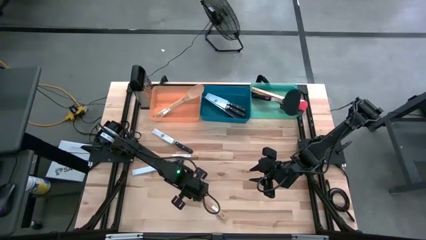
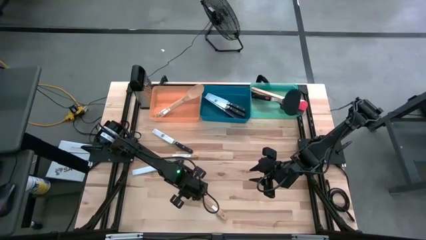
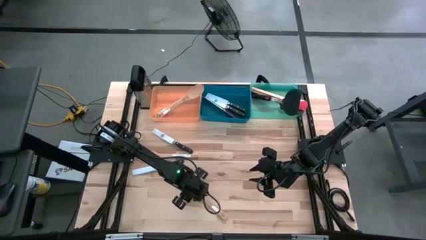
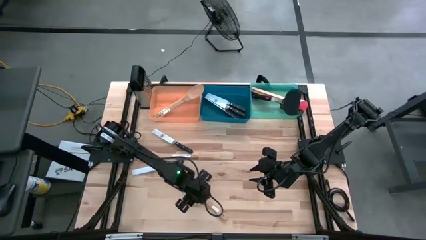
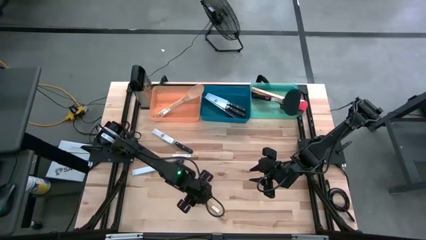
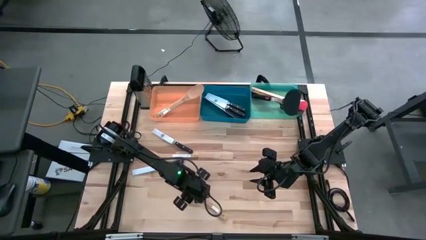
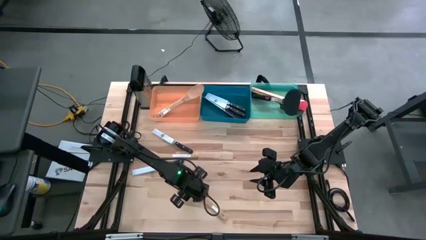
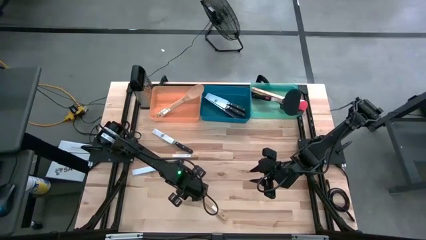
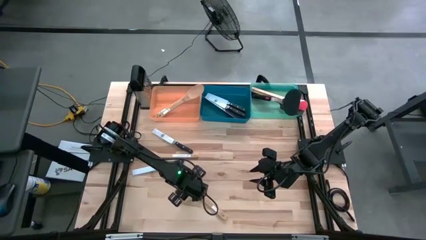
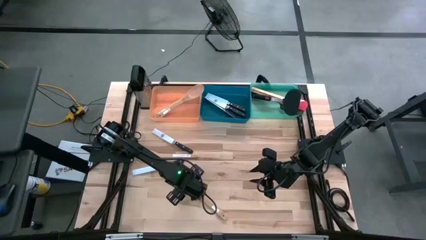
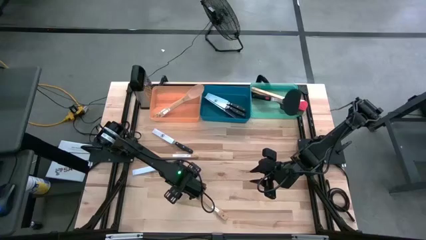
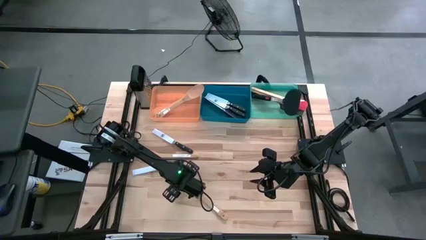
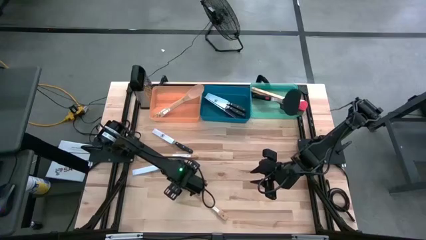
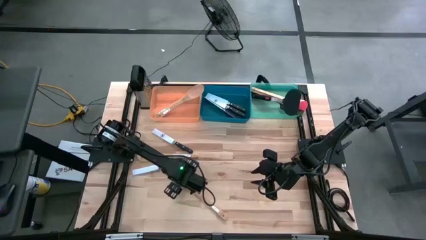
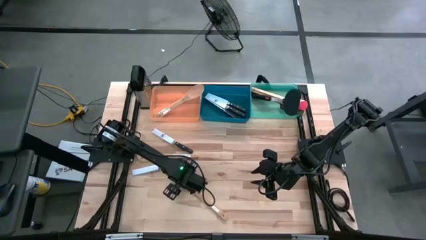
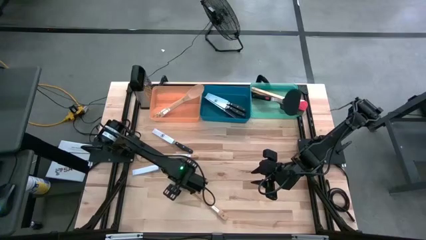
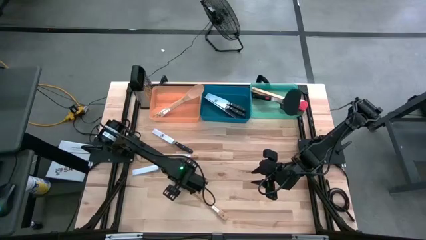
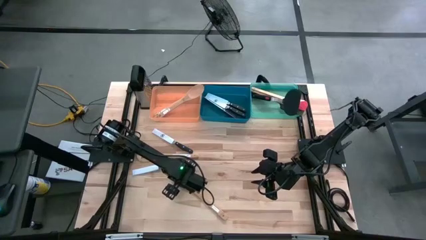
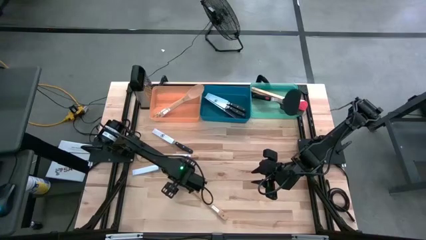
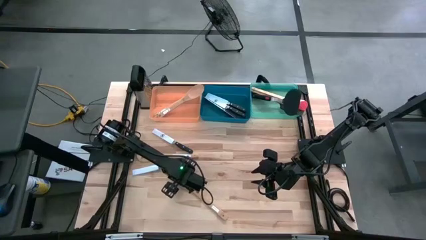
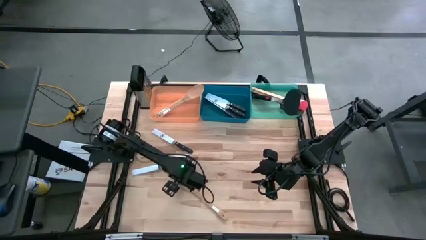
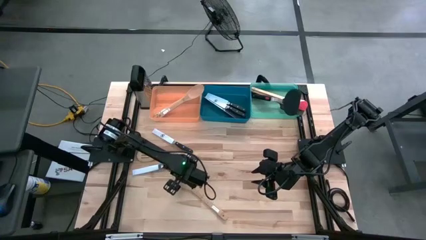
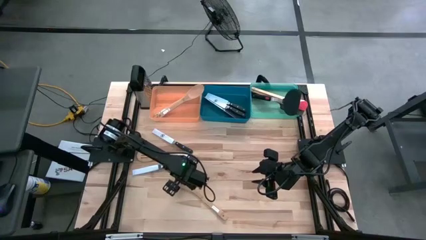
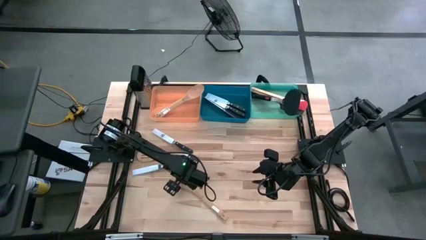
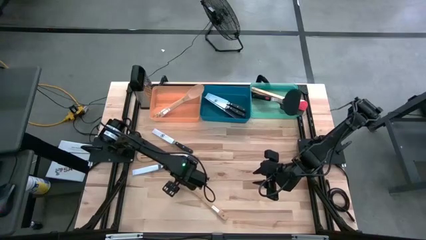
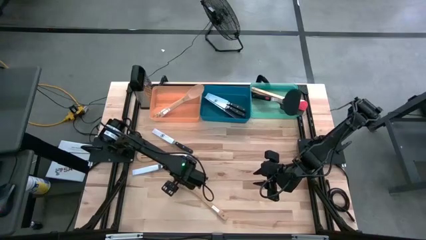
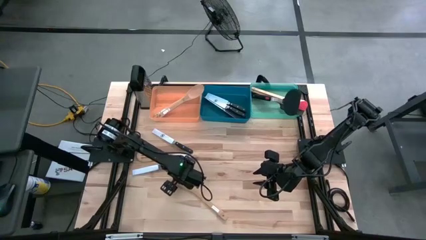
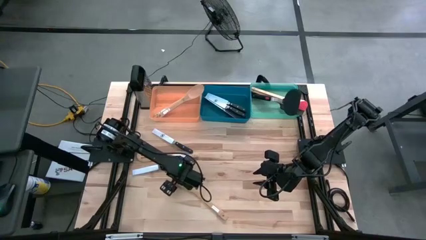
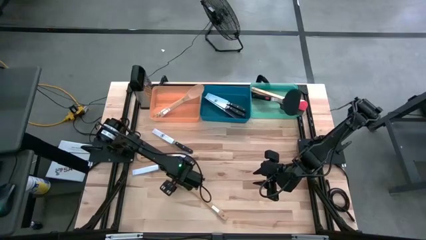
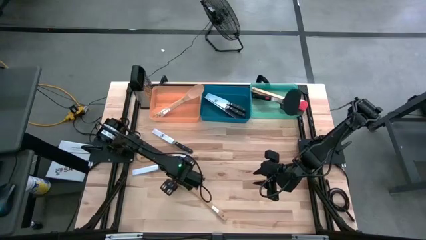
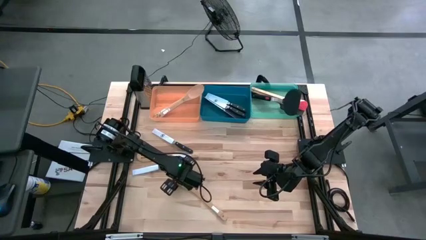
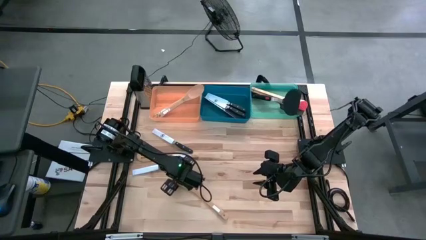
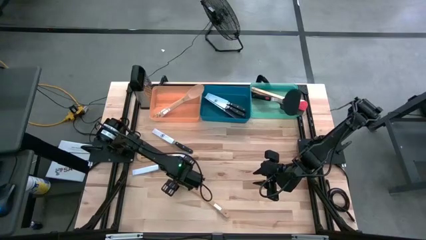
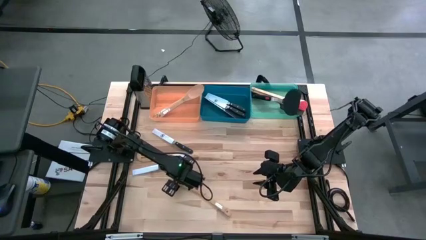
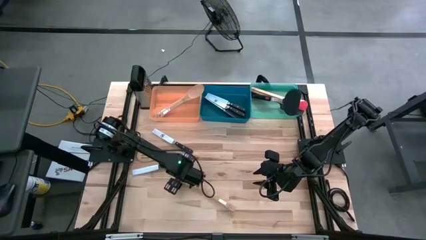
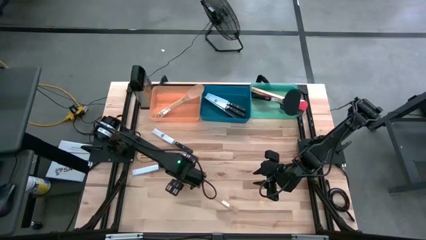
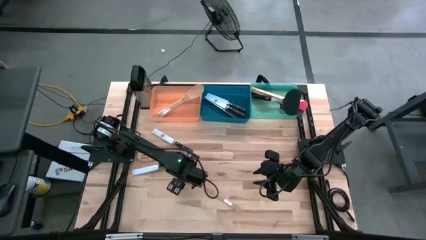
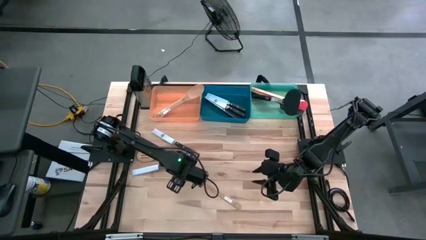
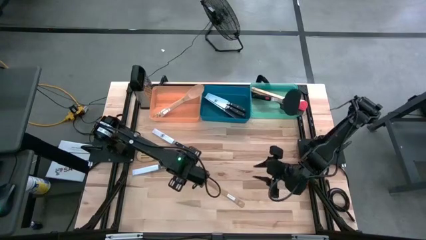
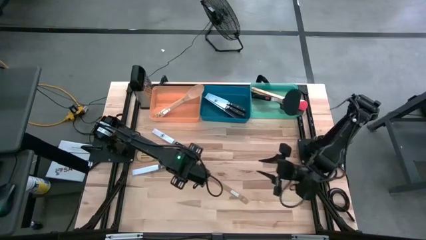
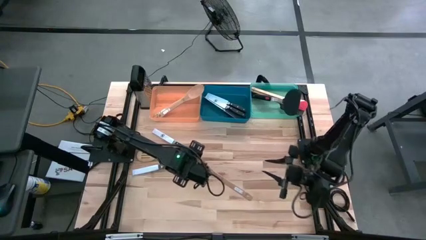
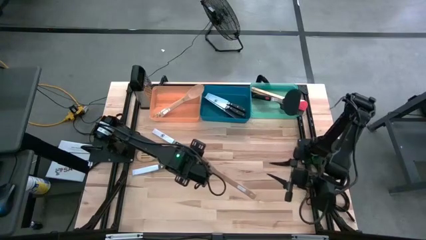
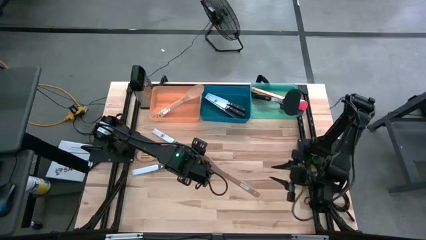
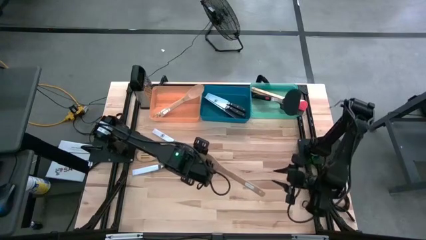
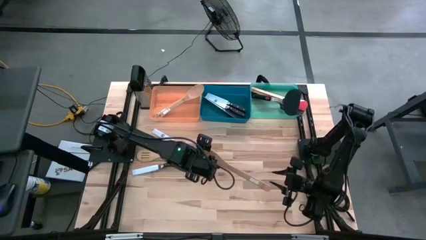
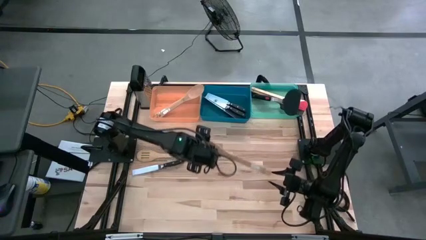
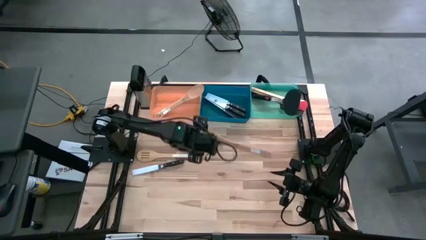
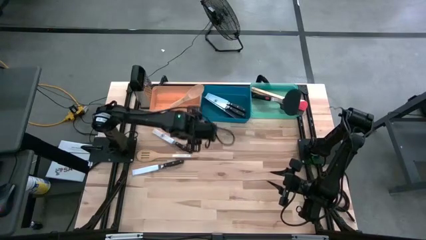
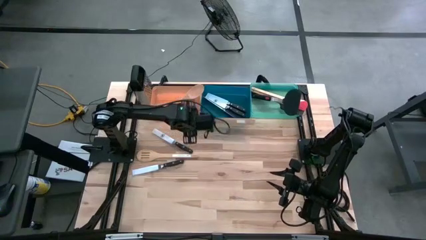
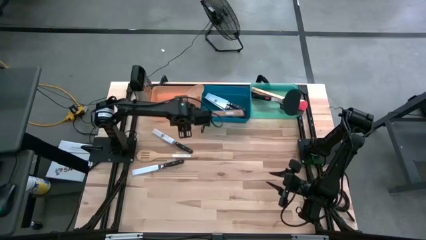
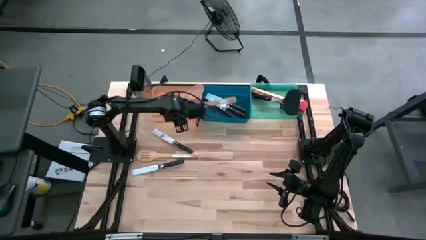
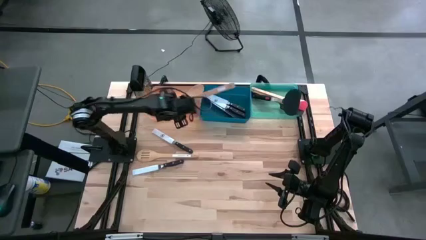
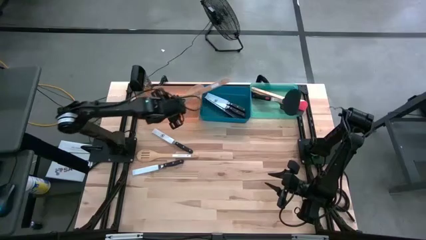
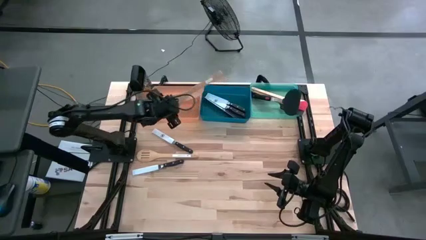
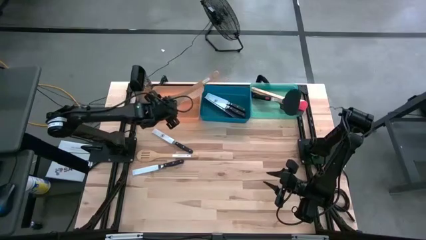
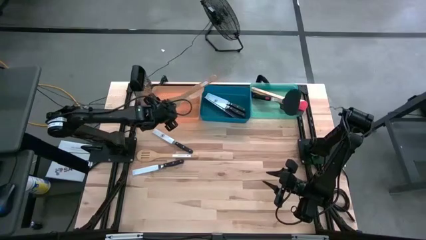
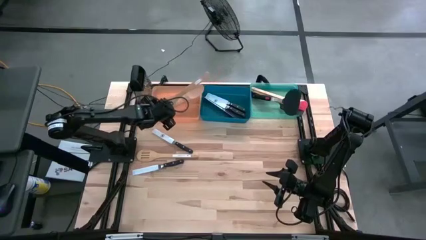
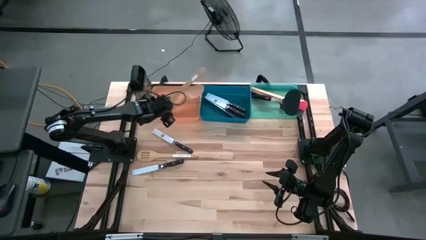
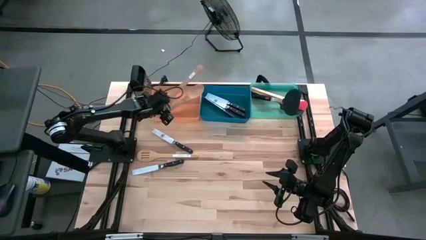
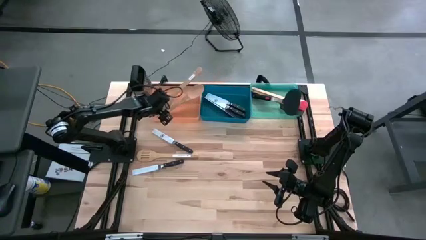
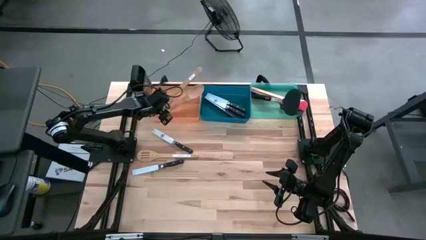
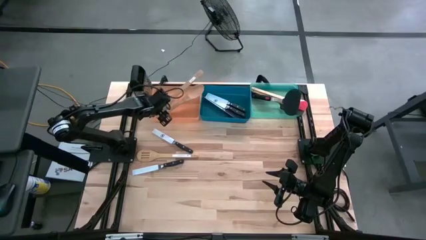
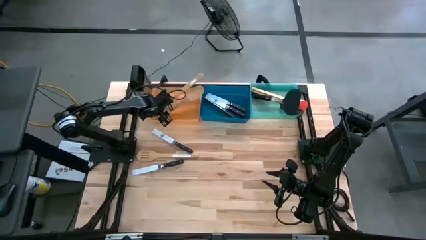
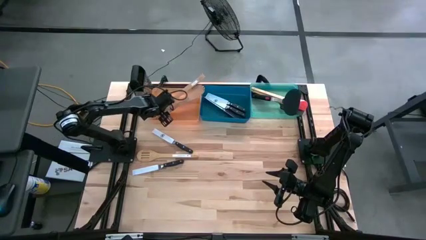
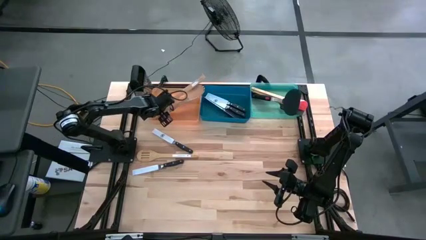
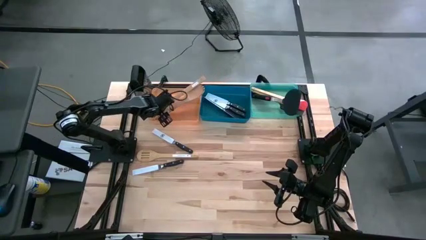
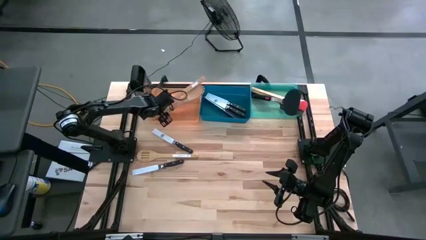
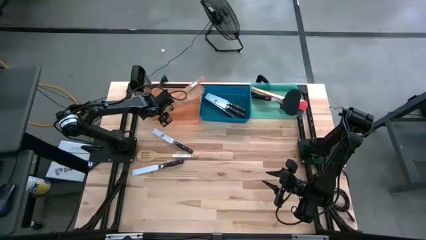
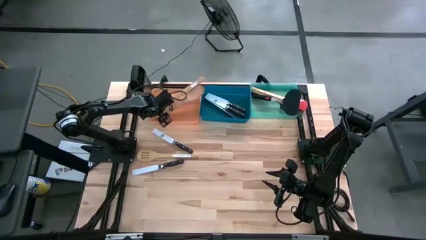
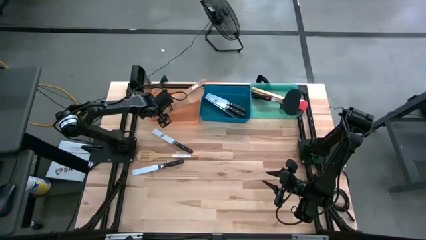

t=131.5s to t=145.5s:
Task: Pick & Place Kitchen Items
Put the wooden serving spoon into the orange bin

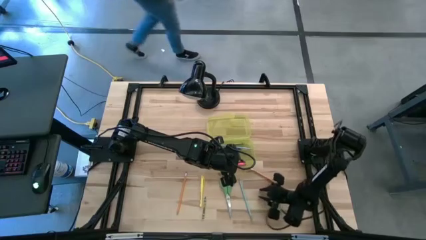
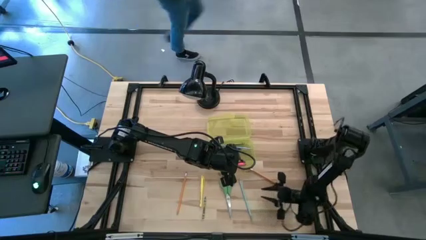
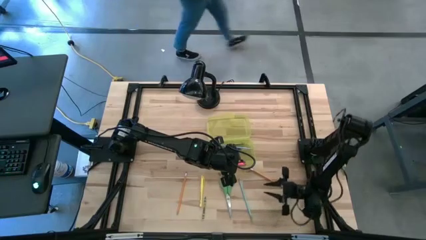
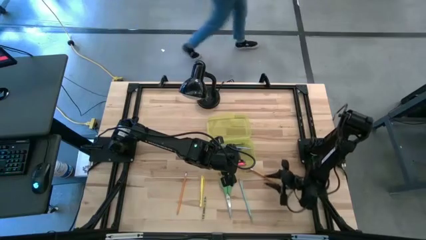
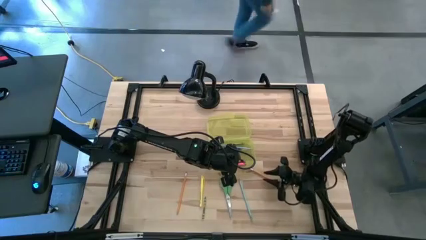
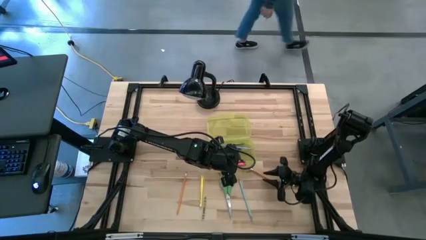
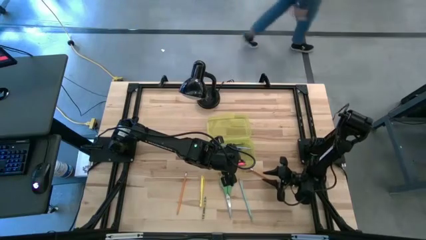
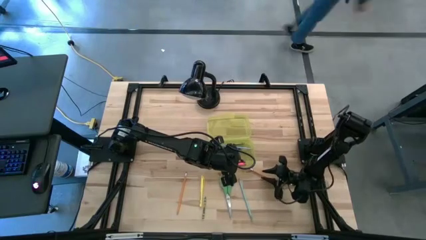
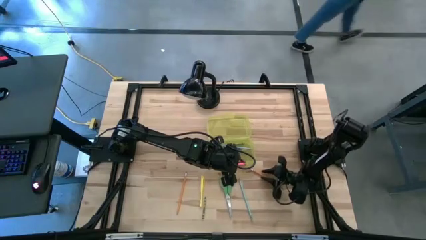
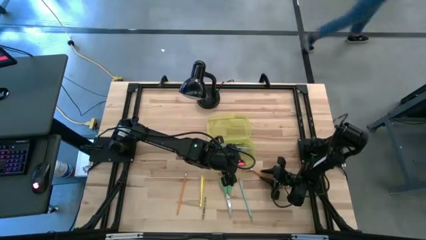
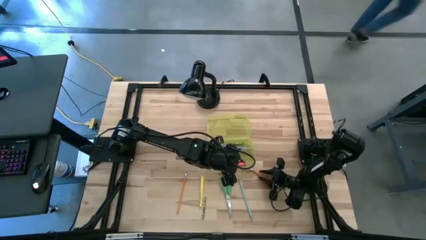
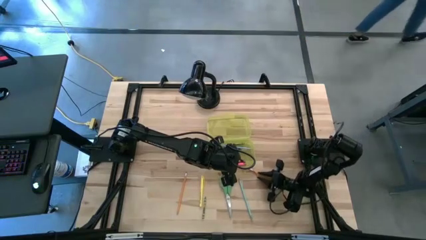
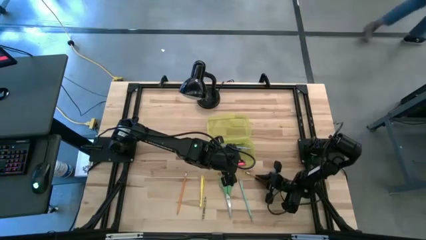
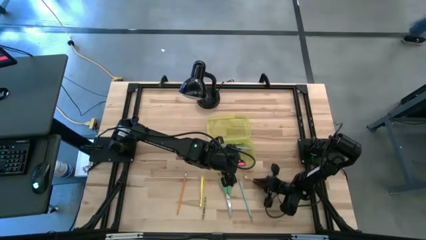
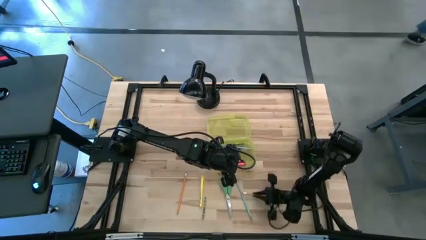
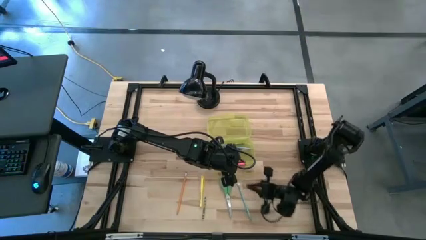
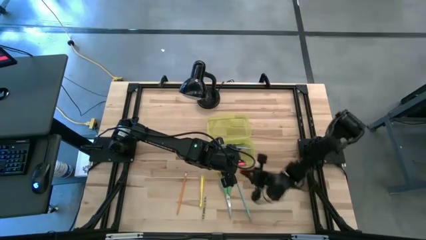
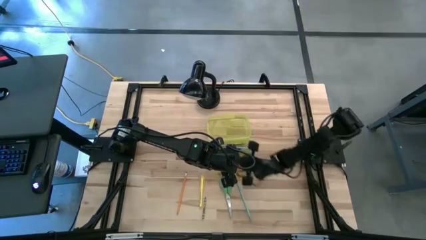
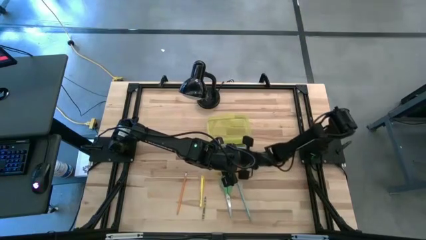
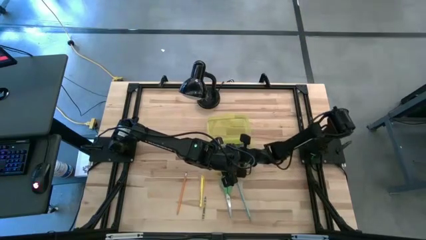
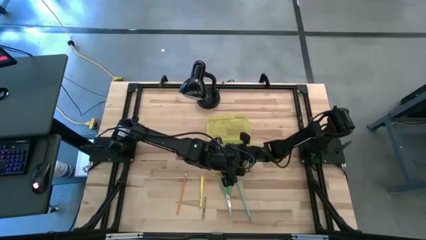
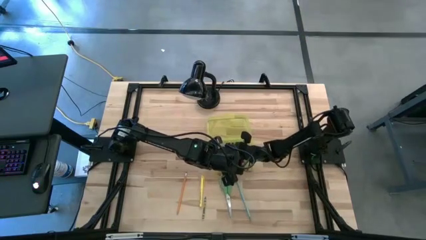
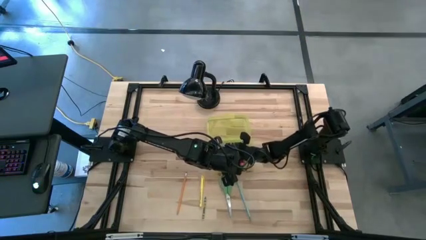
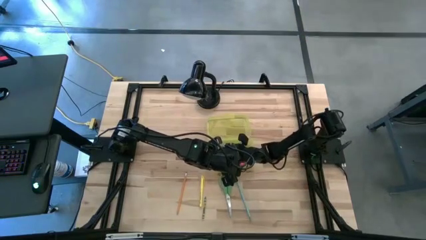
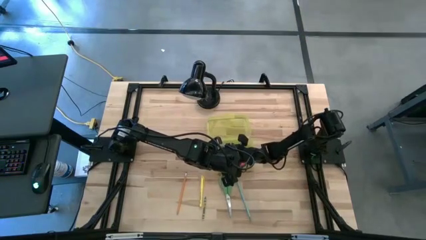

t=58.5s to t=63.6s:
Task: Pick & place school supplies into a supply box
Put the right yellow pencil into the yellow supply box
